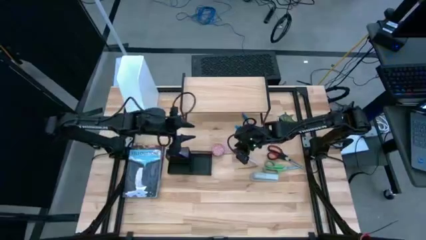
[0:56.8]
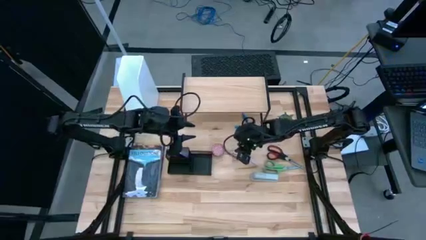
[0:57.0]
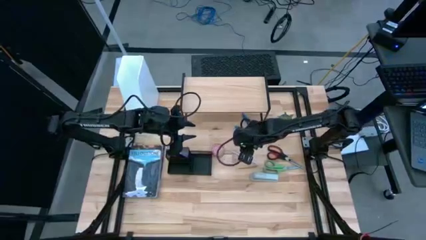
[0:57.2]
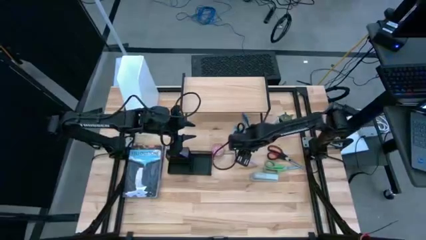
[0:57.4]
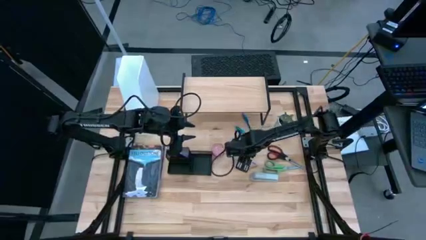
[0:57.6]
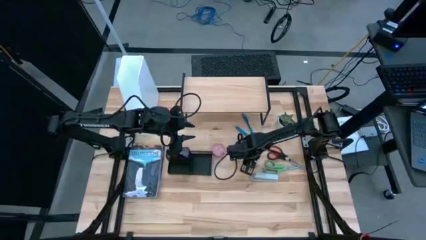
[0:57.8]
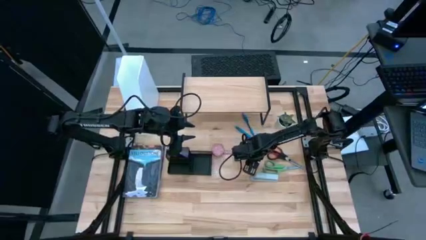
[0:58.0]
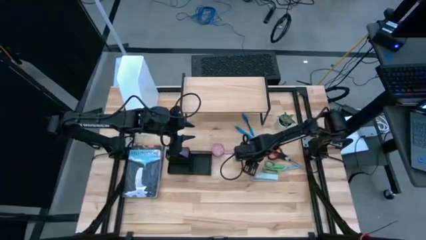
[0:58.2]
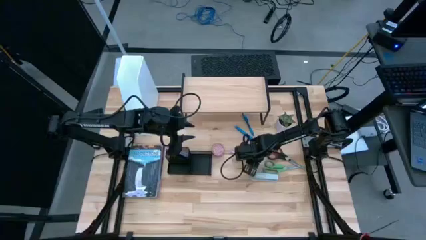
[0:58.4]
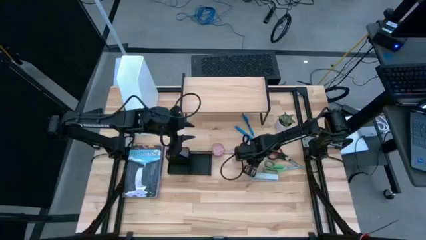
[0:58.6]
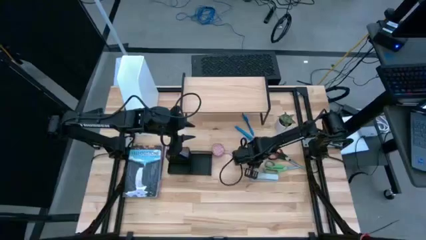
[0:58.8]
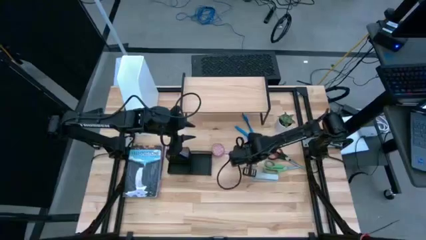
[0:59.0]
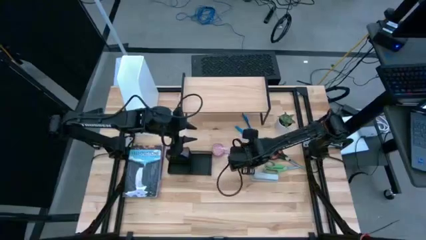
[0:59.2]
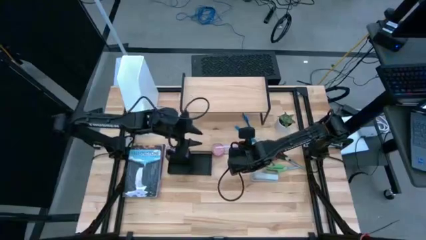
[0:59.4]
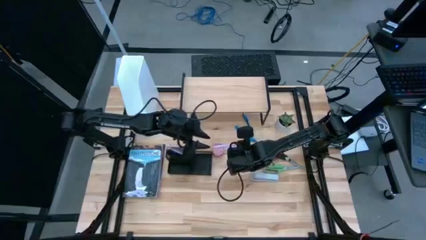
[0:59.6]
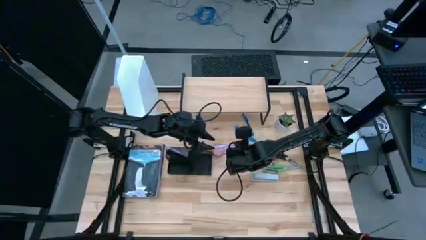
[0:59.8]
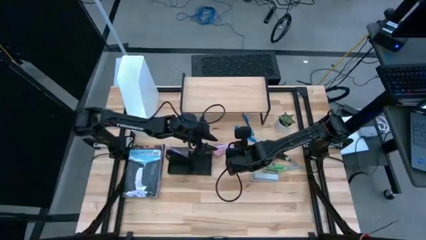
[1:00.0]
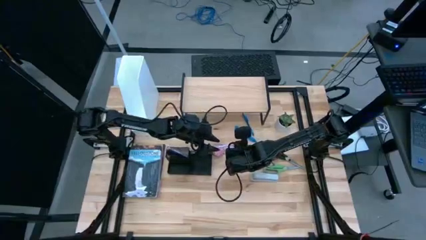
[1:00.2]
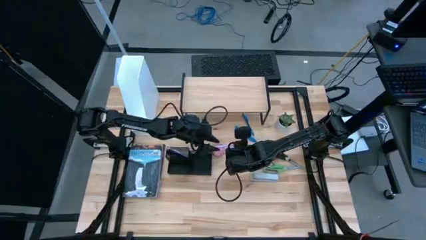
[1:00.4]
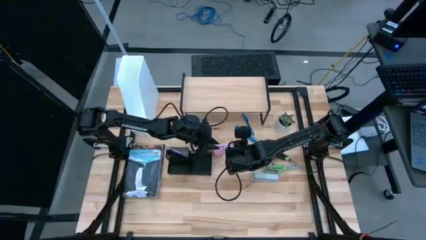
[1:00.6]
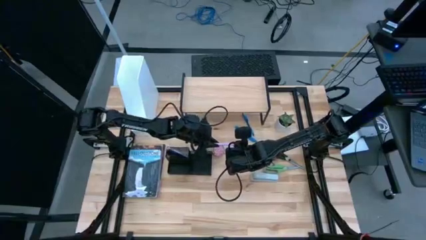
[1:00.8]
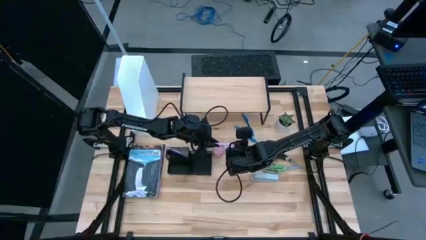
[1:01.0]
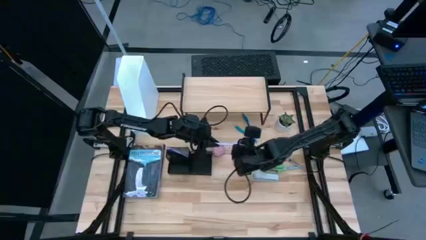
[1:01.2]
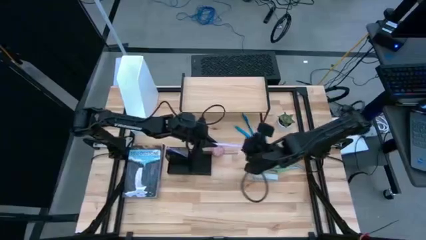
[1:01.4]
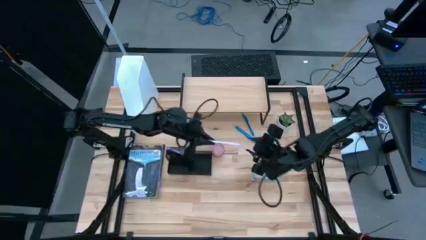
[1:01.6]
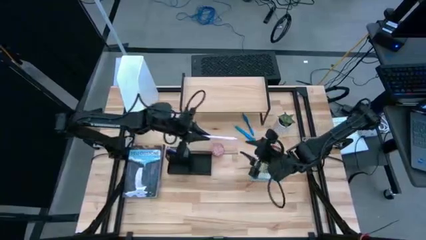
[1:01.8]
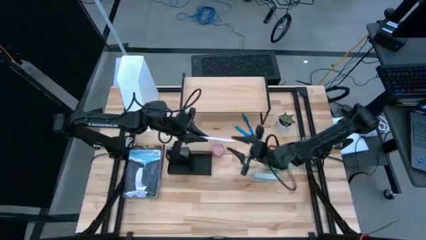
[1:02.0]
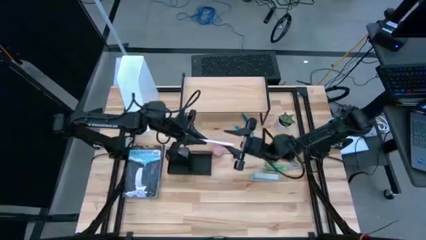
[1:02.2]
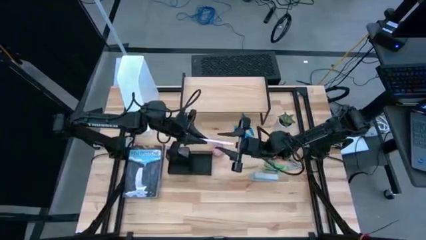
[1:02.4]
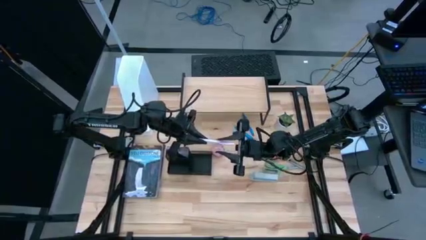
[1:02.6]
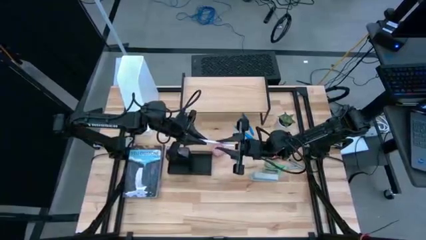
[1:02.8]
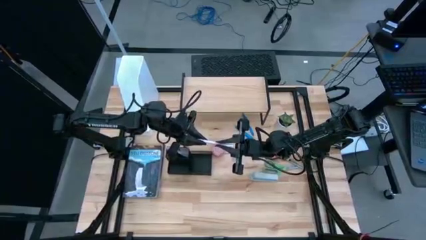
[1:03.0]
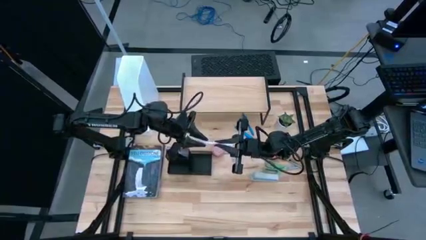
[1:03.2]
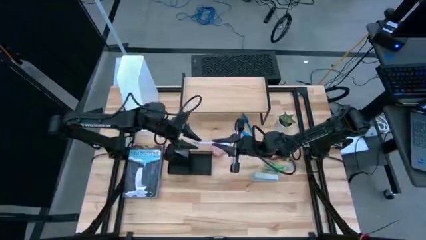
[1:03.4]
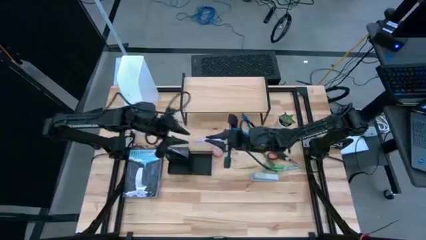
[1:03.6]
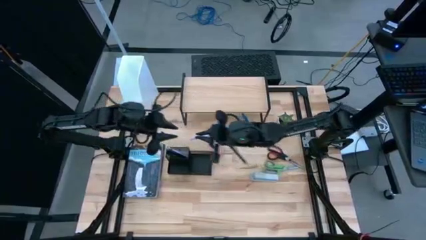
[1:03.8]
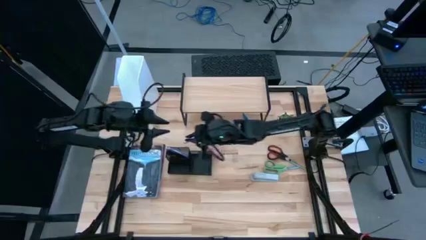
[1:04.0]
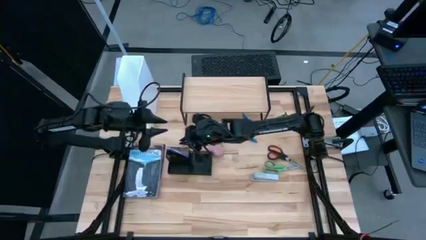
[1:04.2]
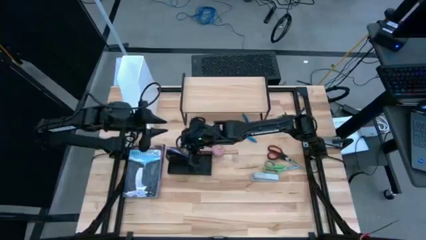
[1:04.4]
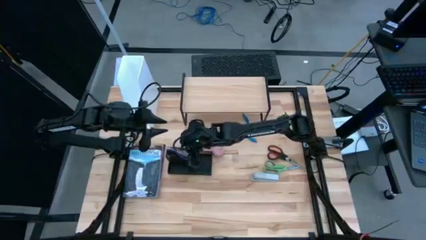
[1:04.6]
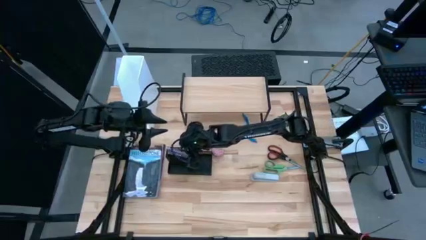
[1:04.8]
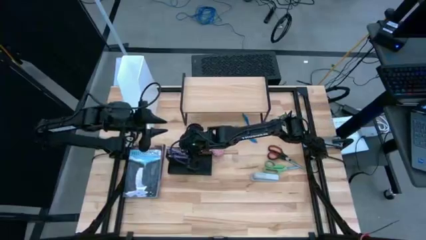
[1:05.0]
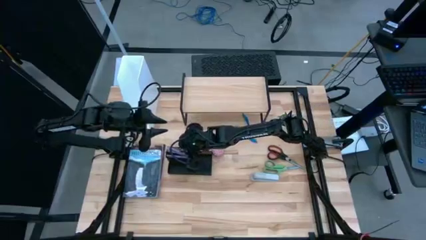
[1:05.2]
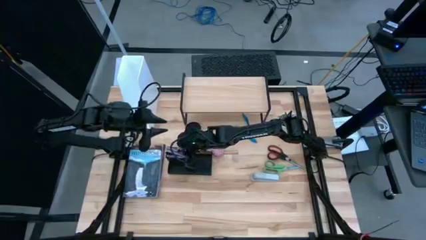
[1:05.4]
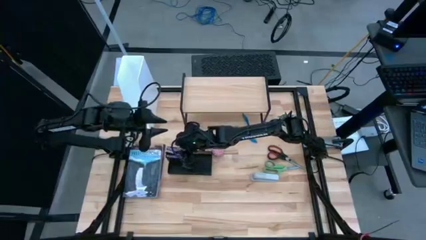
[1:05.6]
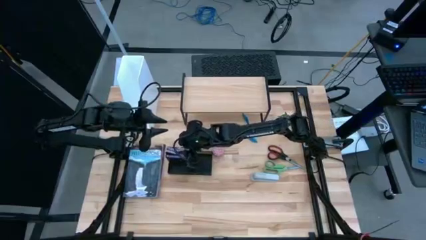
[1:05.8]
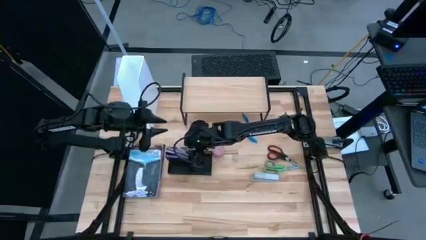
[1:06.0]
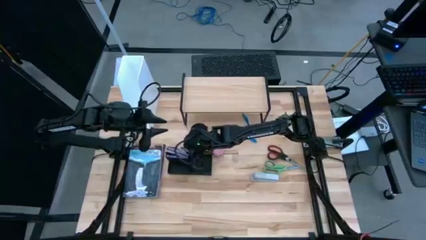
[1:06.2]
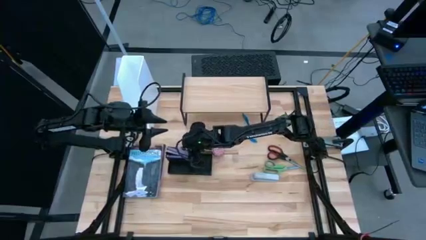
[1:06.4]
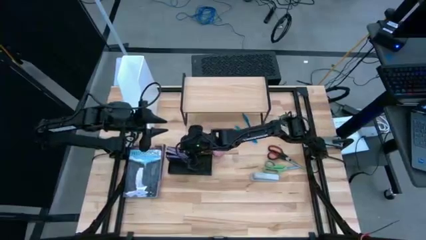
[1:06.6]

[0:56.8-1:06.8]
Task: Stock shelves
Put the purple pen into the desk organizer

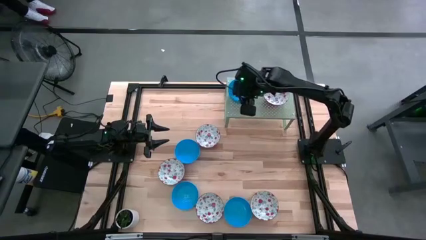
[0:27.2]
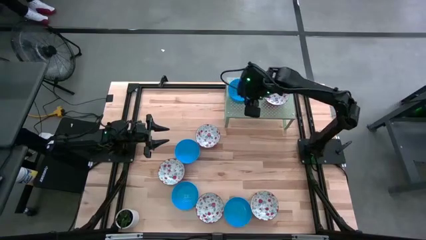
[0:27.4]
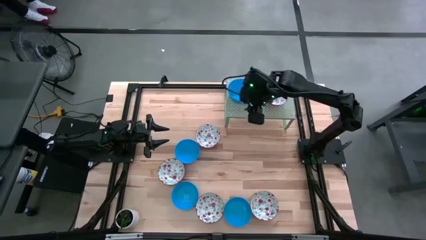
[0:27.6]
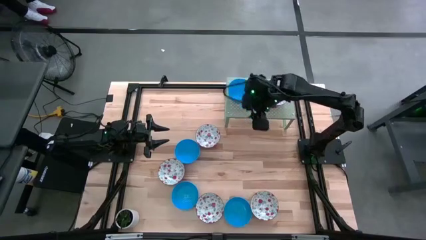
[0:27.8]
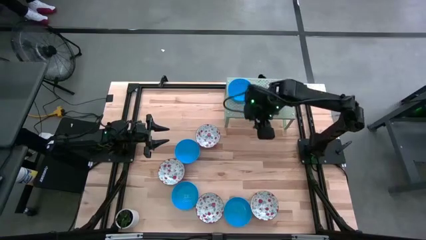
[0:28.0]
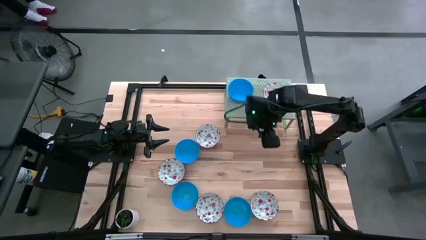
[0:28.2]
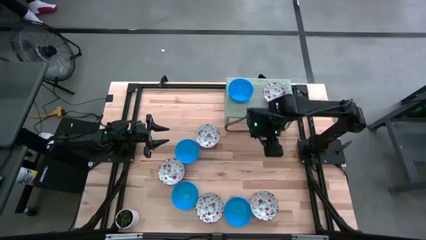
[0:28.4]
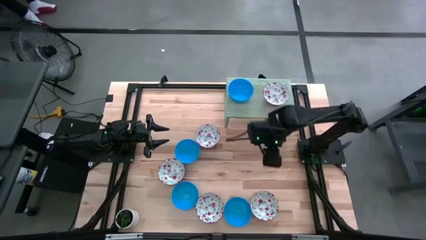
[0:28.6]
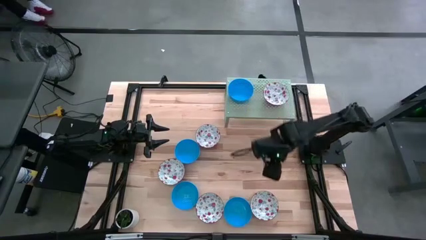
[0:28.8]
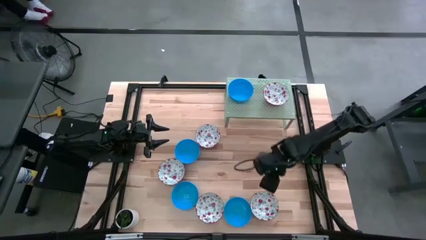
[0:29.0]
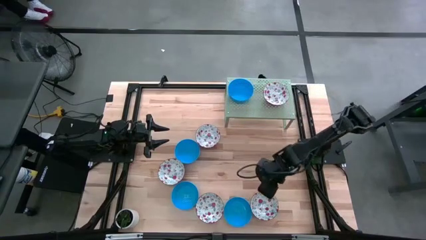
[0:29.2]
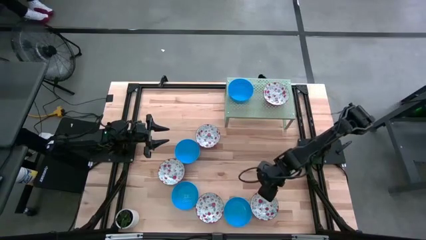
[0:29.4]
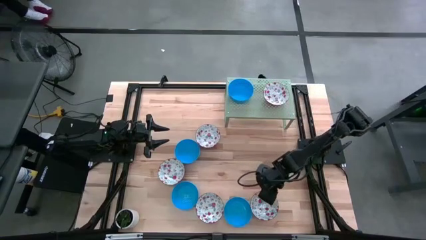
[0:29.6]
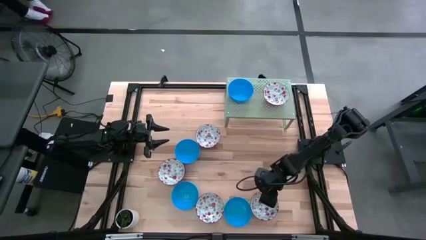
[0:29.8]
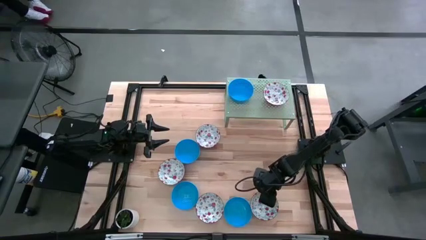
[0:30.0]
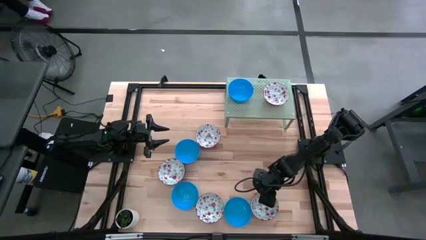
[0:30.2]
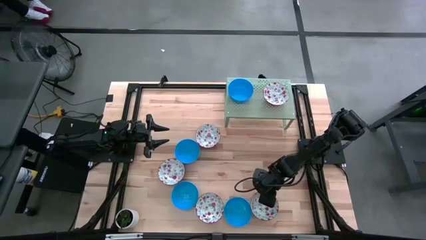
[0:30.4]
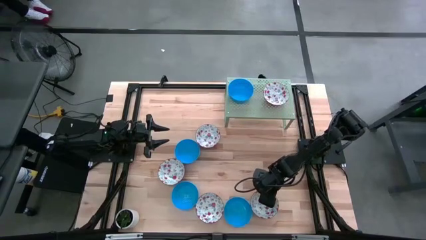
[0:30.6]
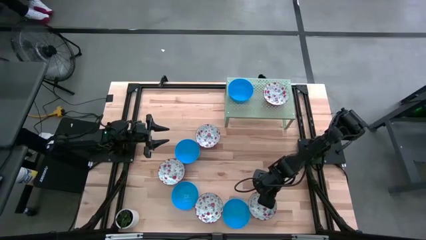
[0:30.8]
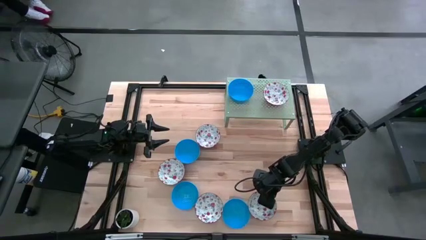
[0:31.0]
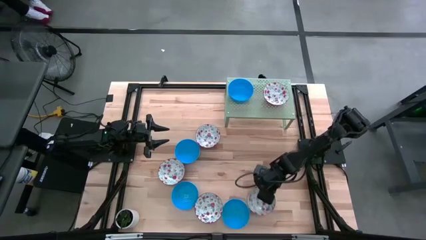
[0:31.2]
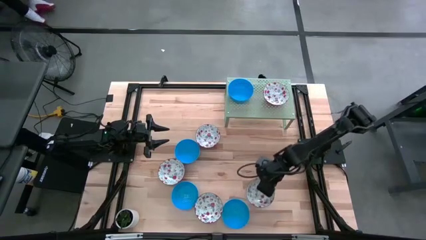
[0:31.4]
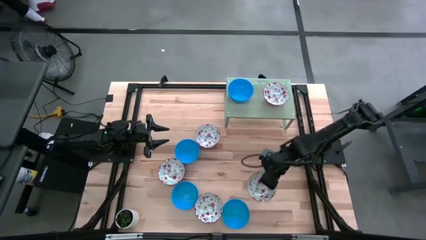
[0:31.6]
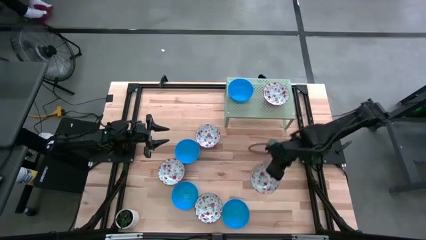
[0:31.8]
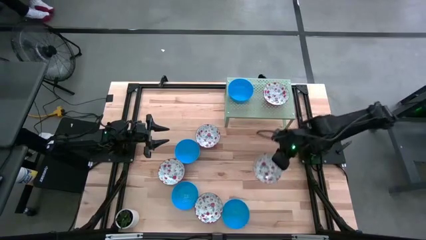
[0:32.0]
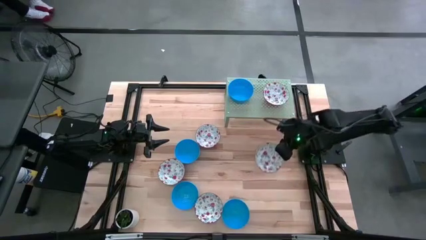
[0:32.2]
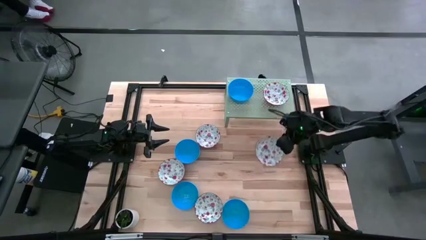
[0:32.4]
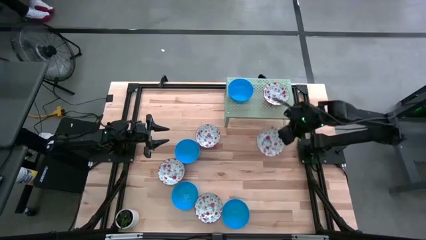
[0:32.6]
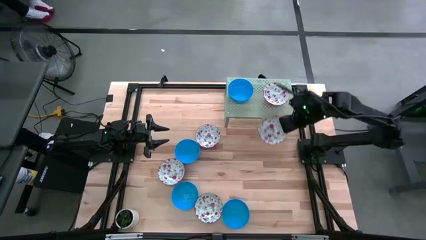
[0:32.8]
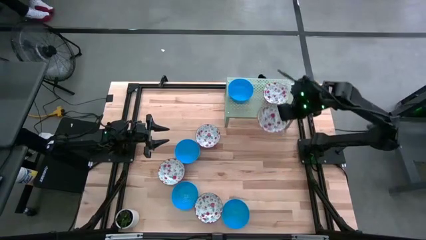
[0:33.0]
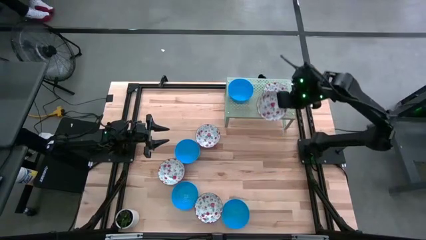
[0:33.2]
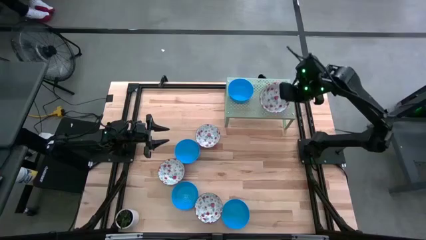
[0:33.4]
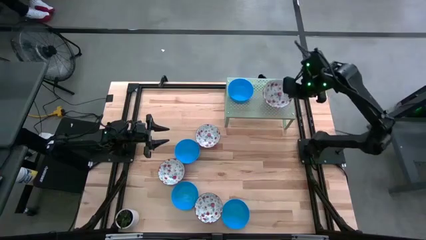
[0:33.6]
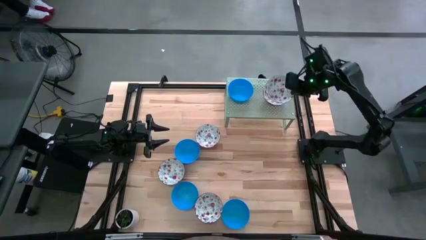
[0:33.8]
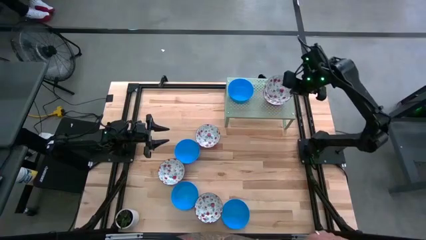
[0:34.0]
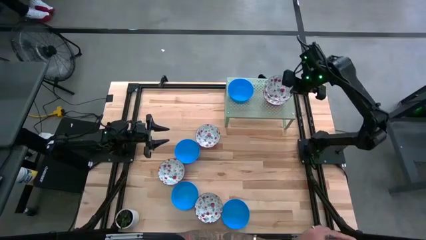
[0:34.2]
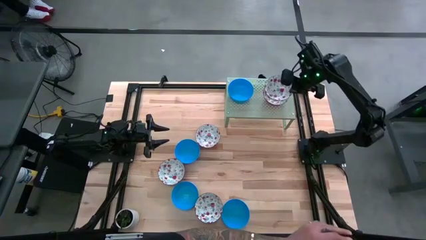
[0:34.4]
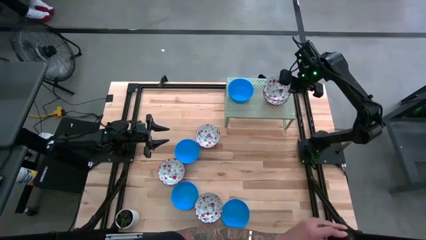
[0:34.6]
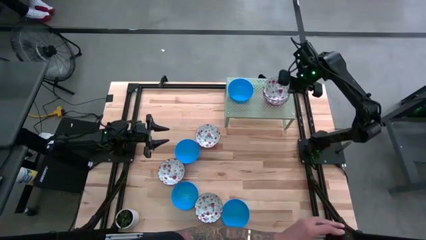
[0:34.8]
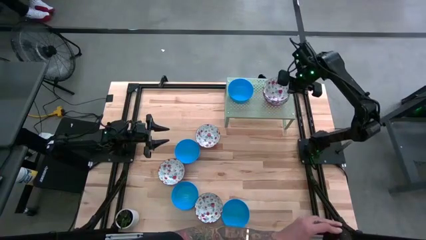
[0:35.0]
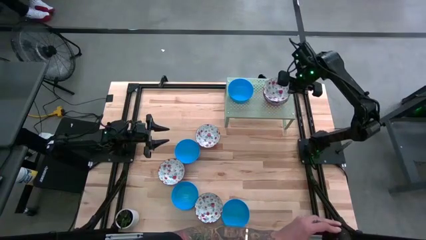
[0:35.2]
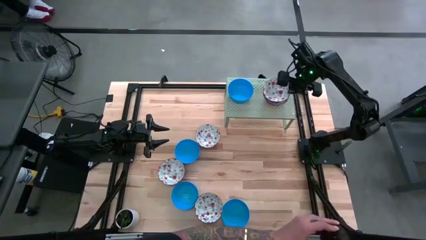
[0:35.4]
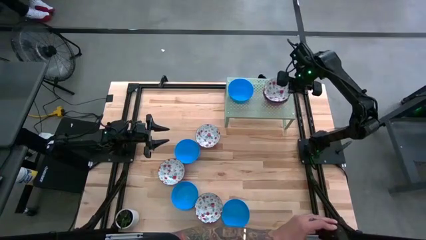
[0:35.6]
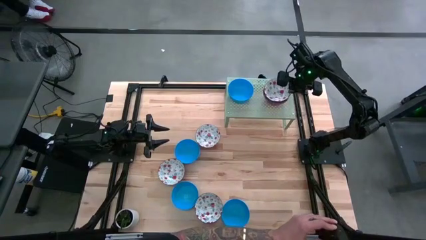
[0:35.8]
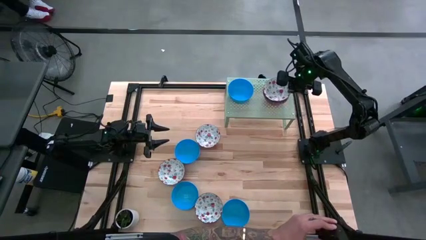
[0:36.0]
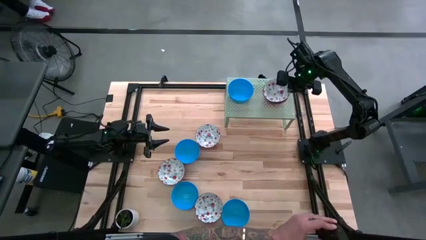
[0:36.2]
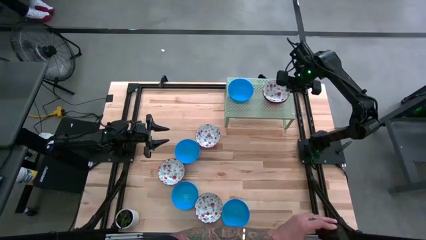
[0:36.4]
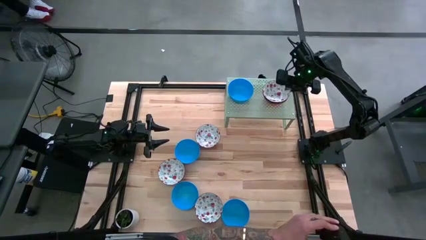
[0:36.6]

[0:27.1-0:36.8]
Task: Pick & Place Mini bowls
Stack the white bowl on the white bowl on the shelf
